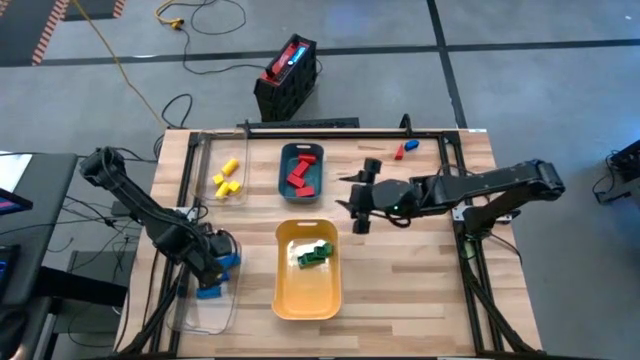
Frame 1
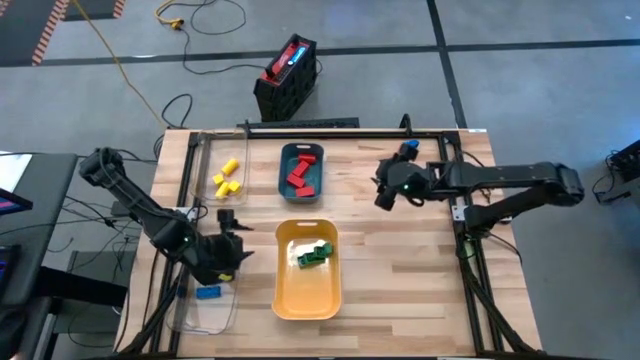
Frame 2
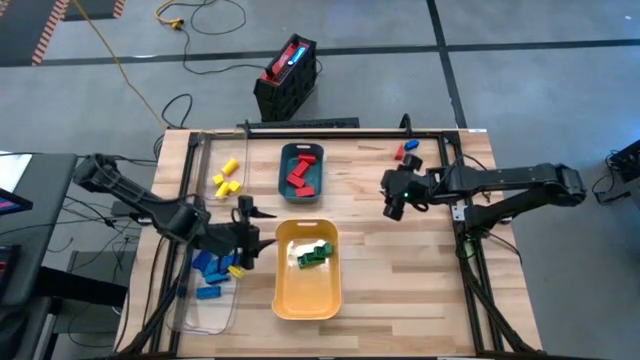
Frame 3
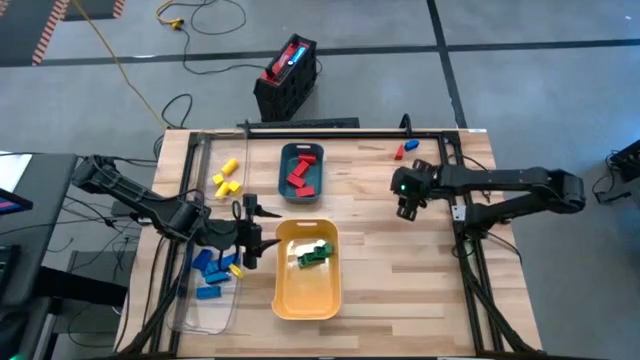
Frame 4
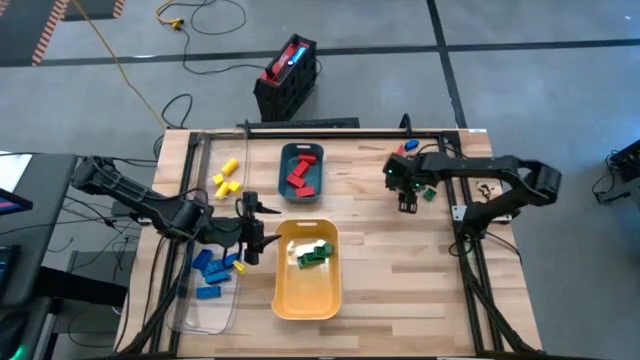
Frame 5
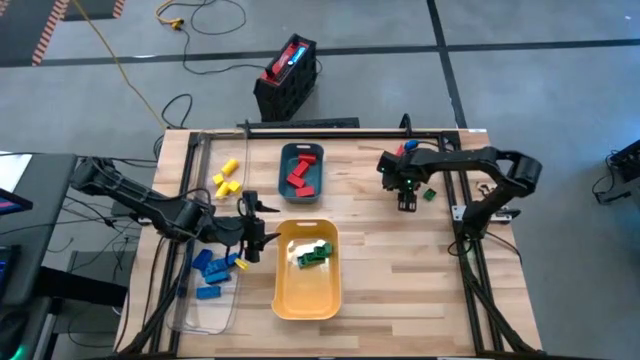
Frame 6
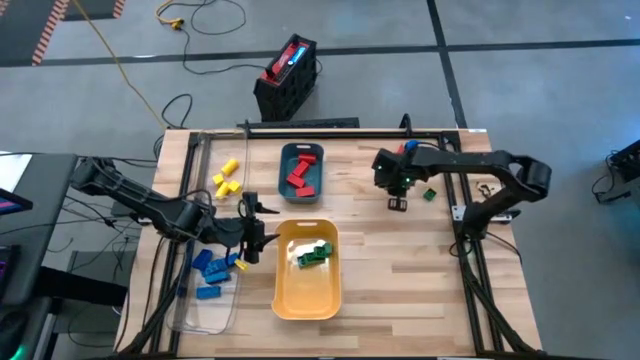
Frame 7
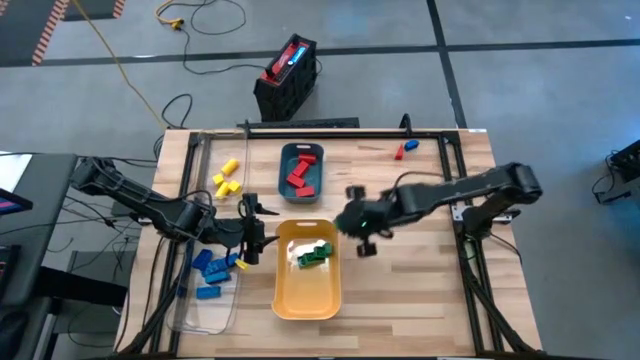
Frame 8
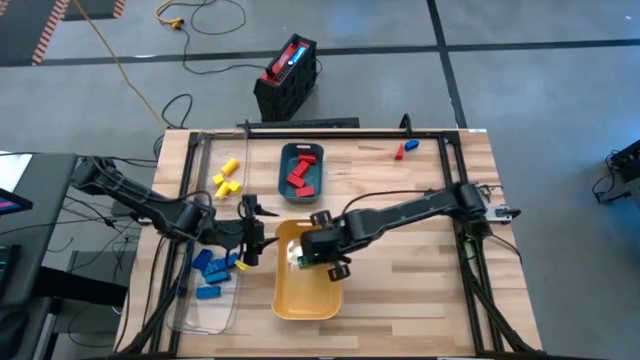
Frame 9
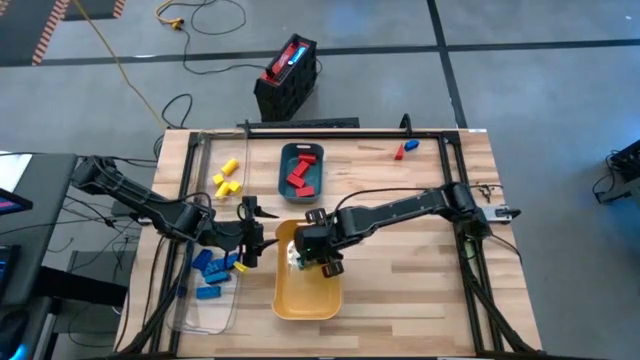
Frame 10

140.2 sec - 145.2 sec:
Task: Sort blocks
Put the square green game piece into the yellow bin

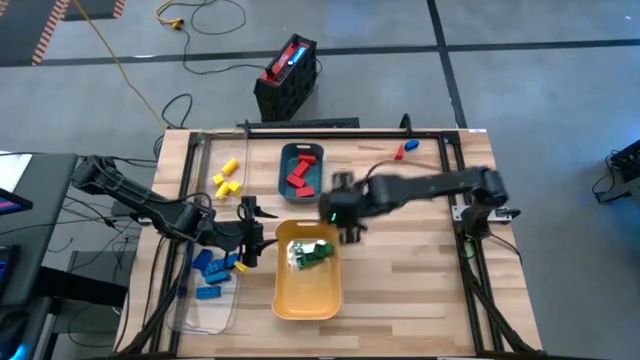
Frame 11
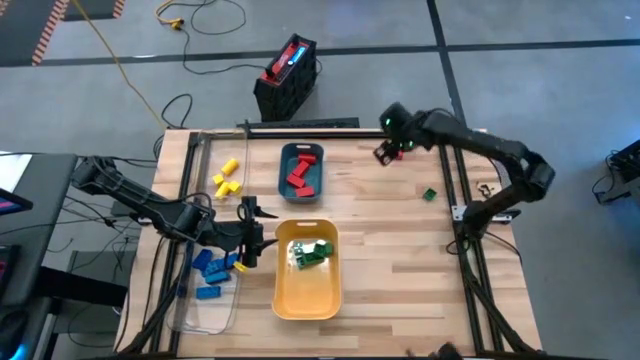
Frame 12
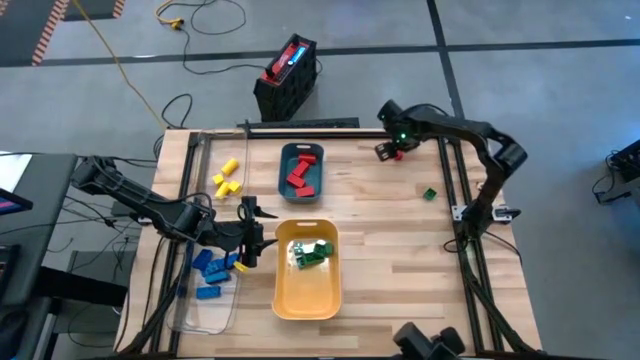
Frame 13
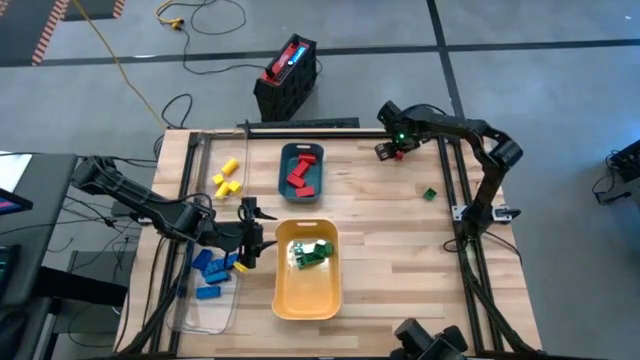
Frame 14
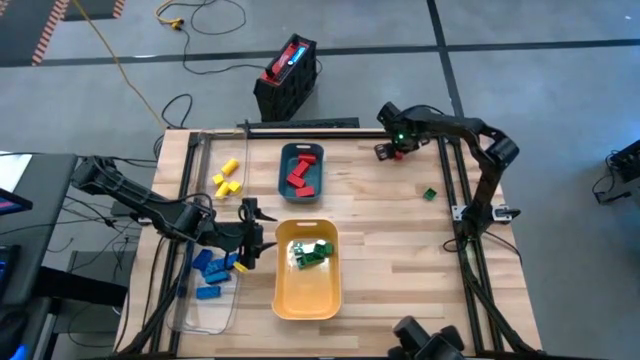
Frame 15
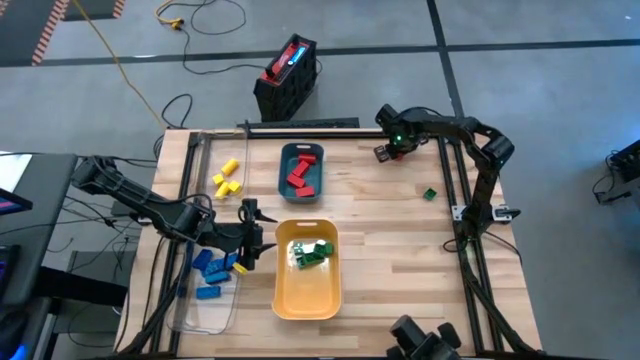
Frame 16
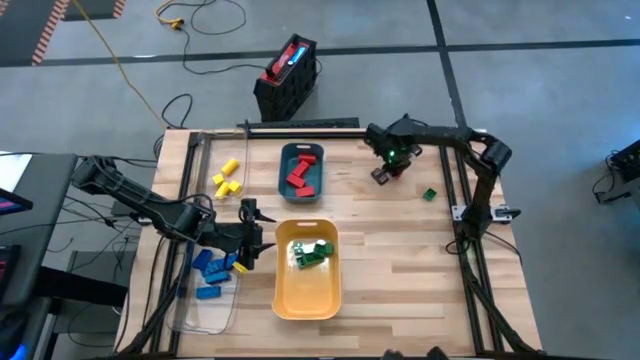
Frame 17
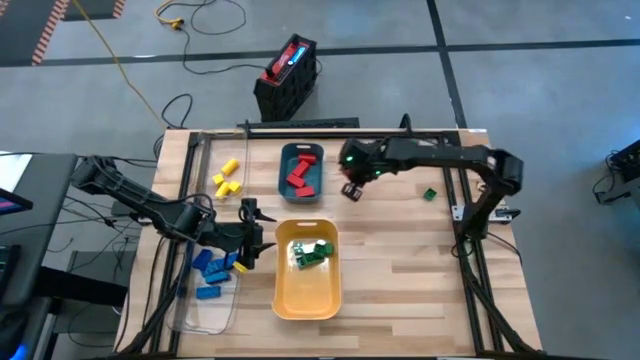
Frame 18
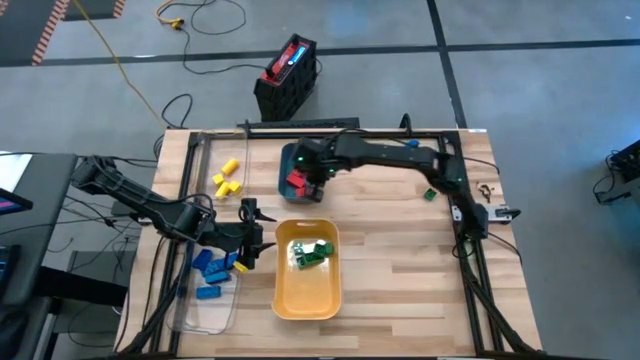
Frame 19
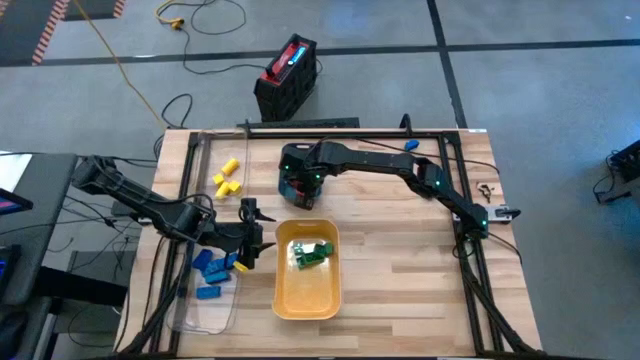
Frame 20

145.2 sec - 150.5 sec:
Put the triangular red wooden block into the blue bin

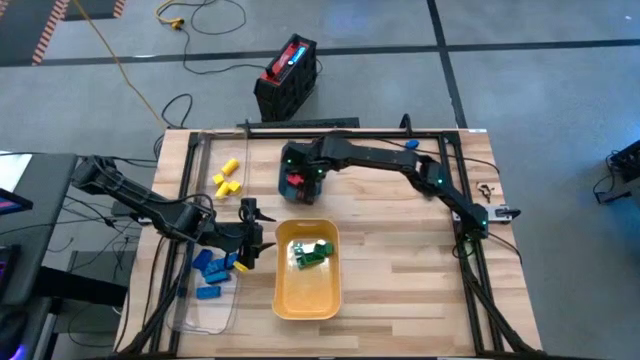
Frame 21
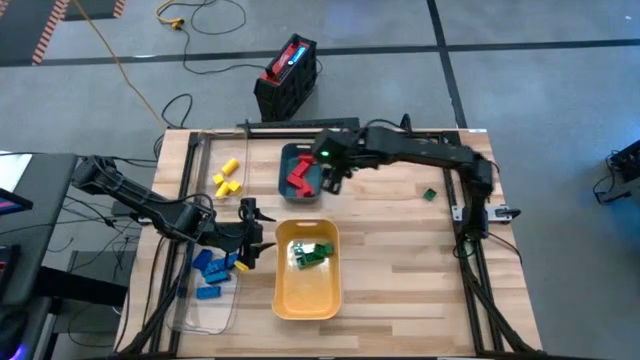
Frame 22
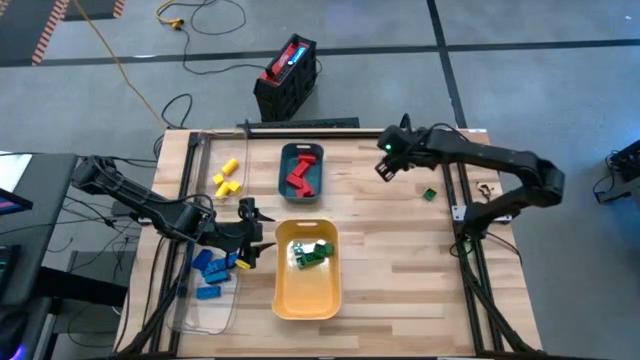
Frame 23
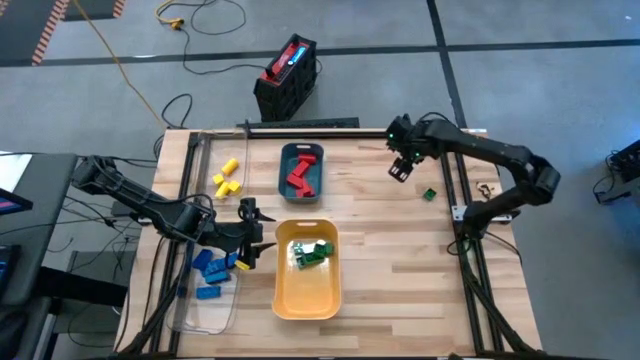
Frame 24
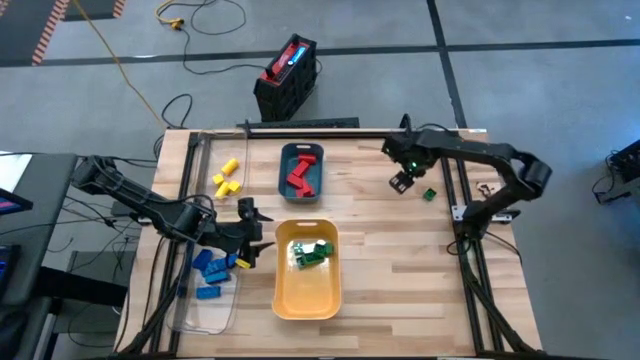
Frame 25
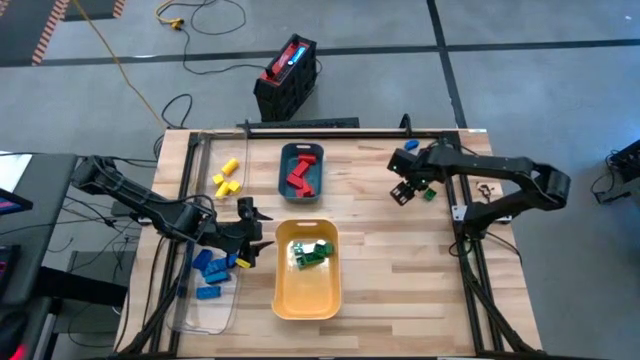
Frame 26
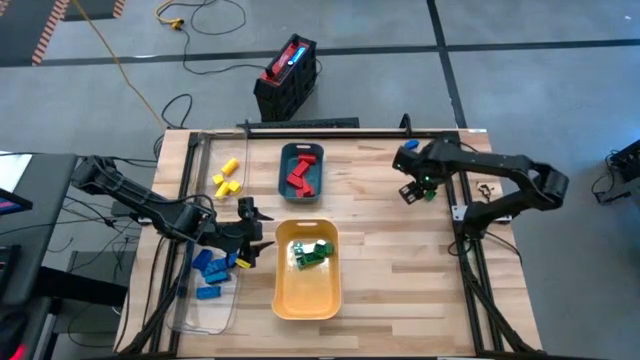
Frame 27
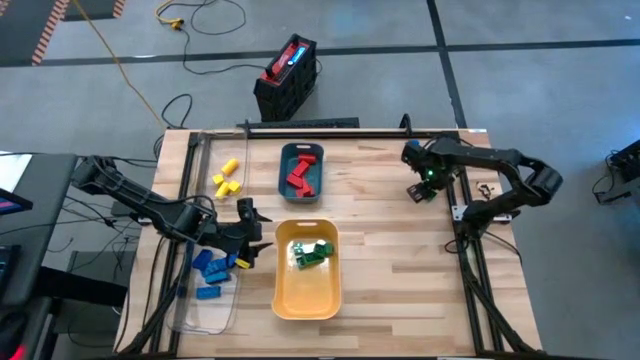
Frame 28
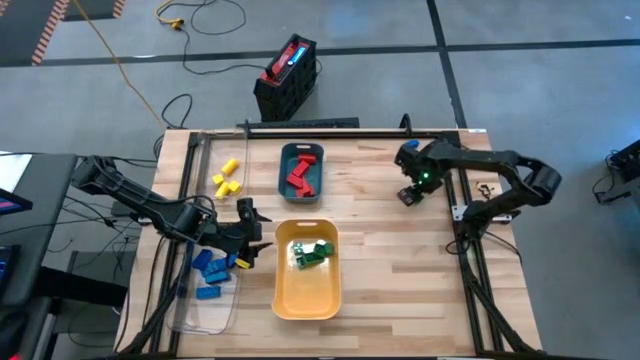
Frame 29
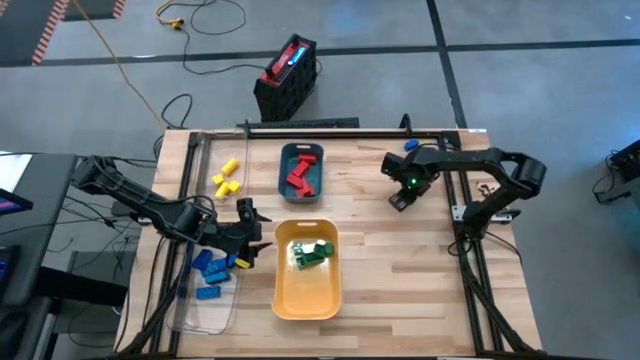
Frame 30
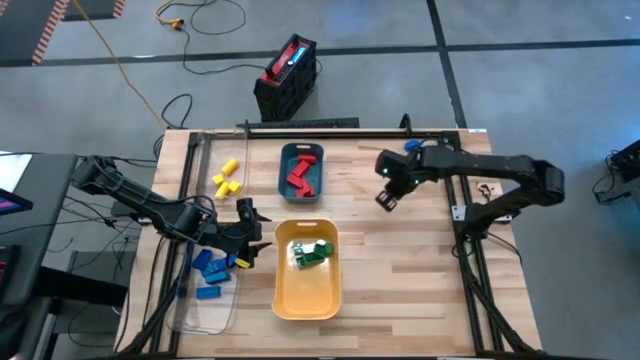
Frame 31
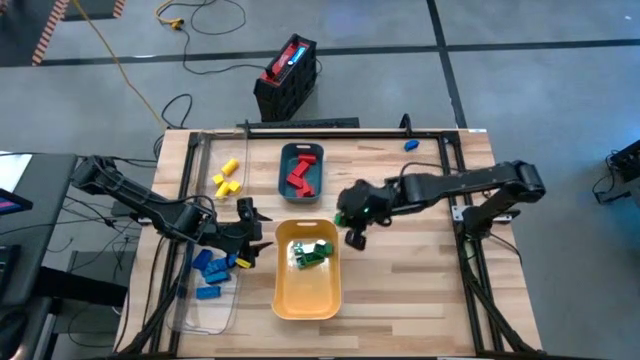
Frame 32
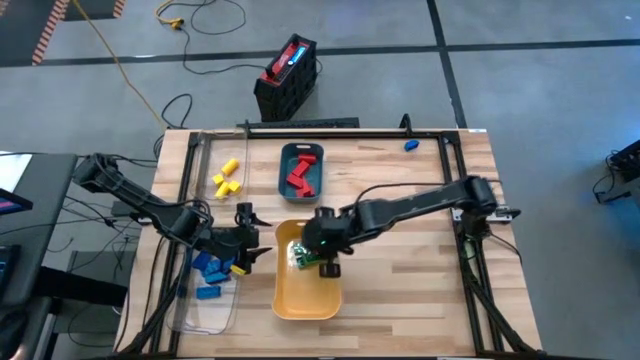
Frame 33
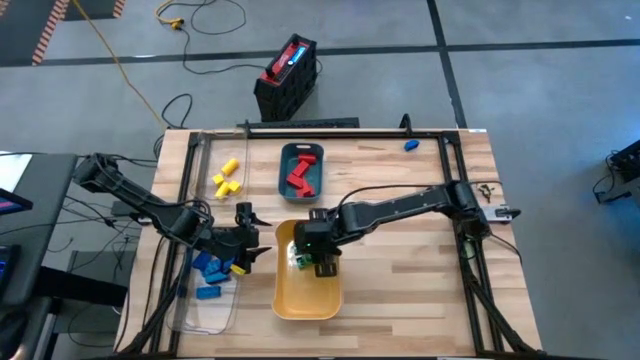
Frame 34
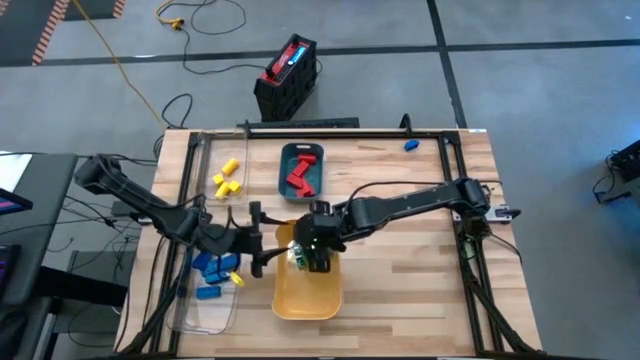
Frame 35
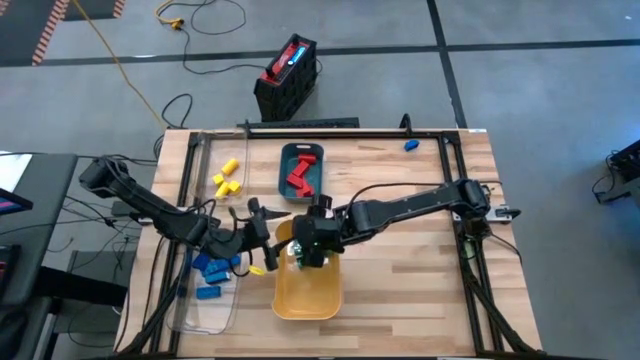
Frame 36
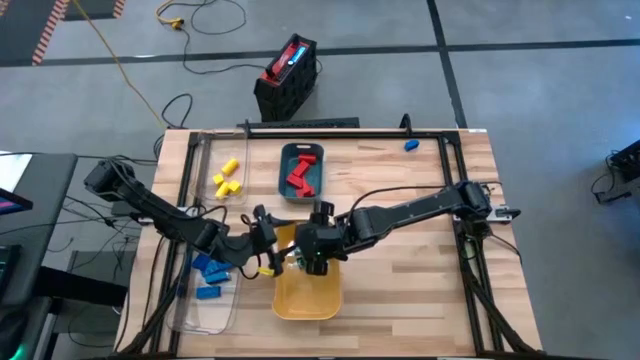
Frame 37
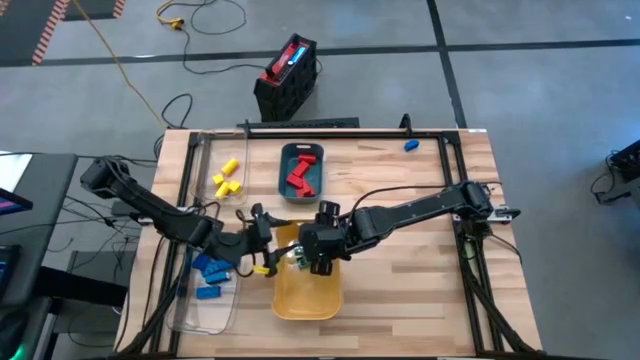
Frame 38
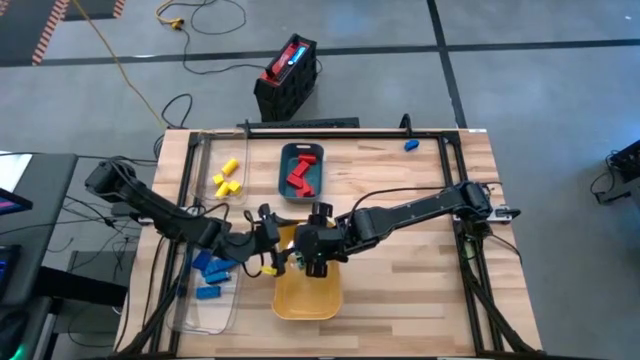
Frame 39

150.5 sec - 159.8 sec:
Put the square green game piece into the yellow bin

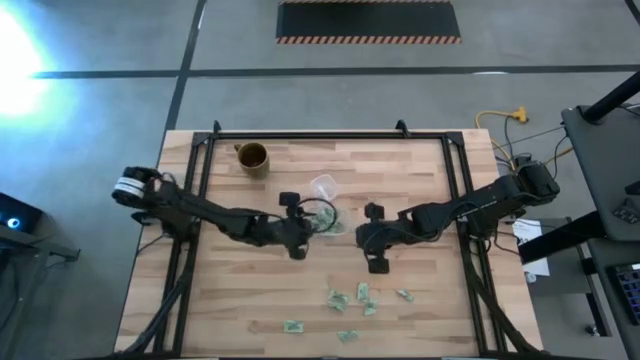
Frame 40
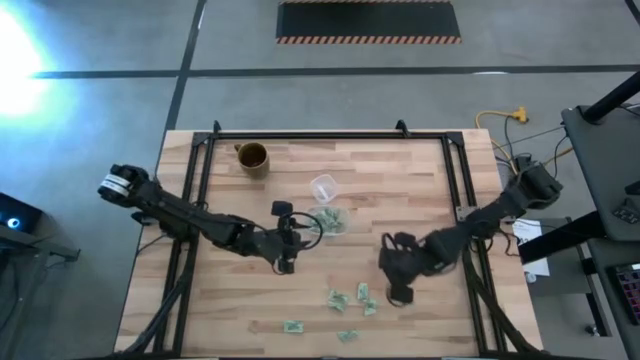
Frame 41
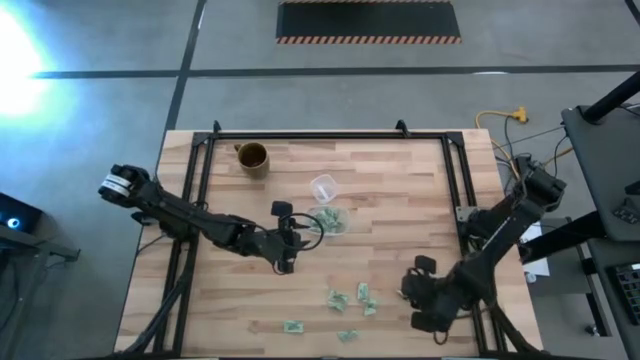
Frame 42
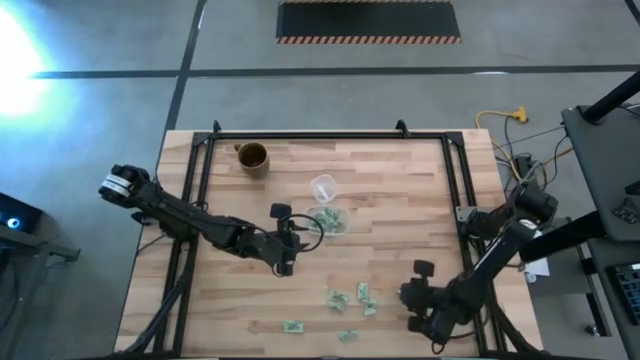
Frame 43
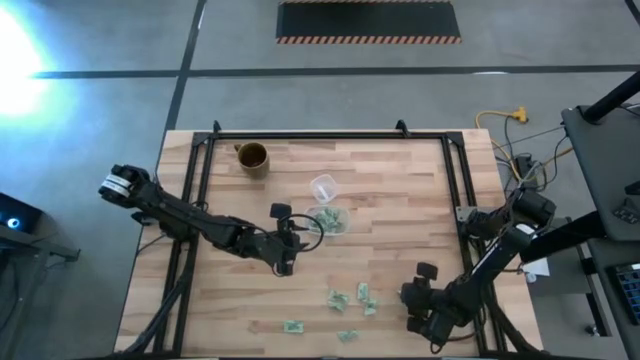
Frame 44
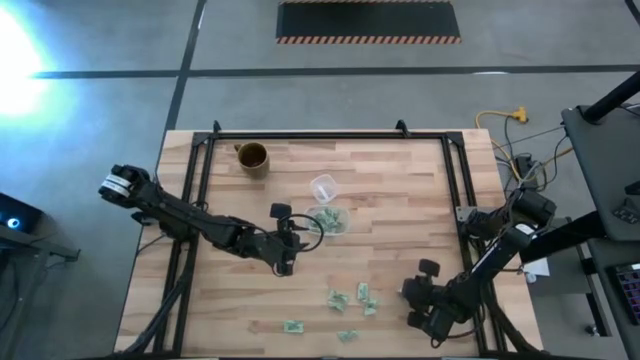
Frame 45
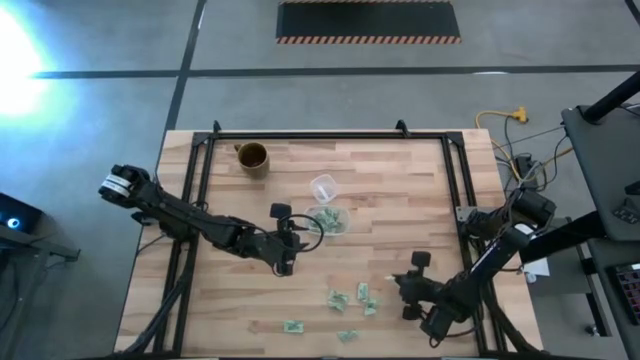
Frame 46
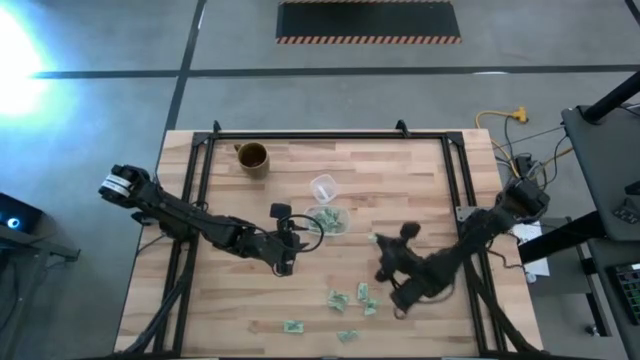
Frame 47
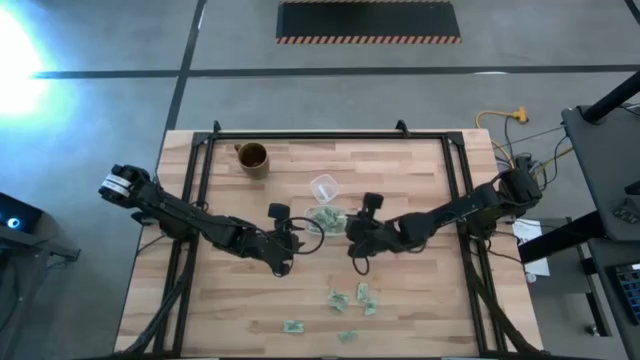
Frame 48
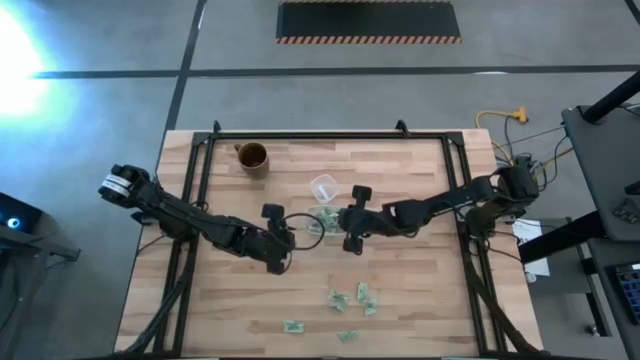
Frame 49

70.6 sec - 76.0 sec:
Task: Pick and place Stevia / Truvia into bins
Put the stevia packet into the bottom transparent container
